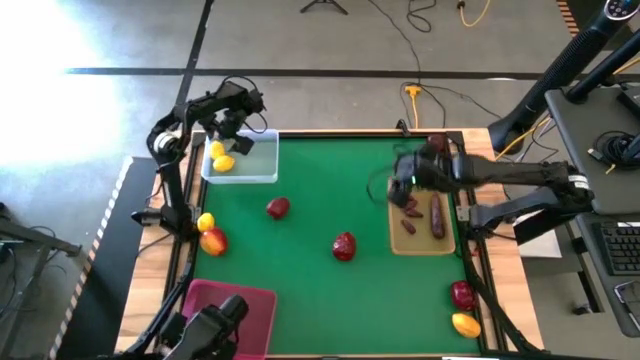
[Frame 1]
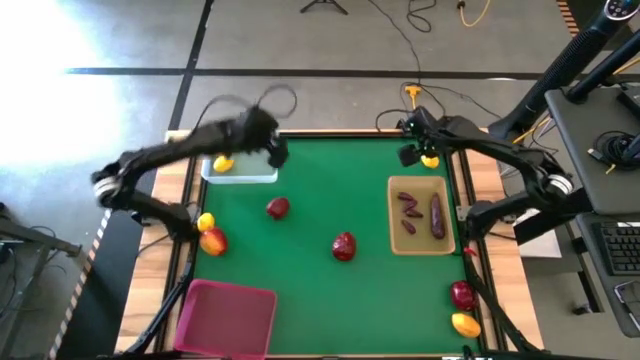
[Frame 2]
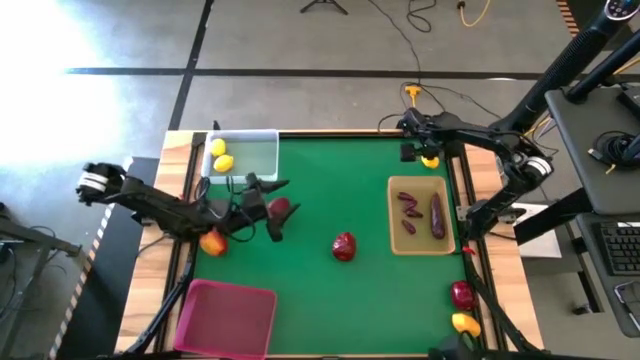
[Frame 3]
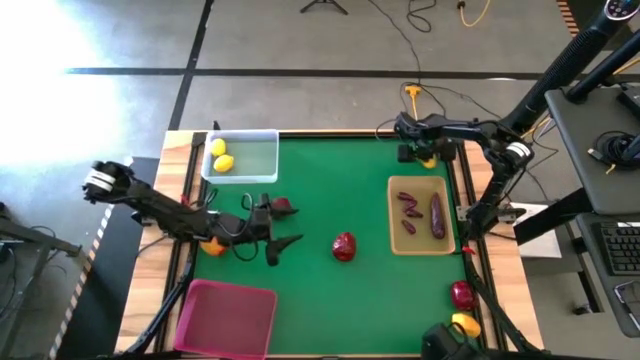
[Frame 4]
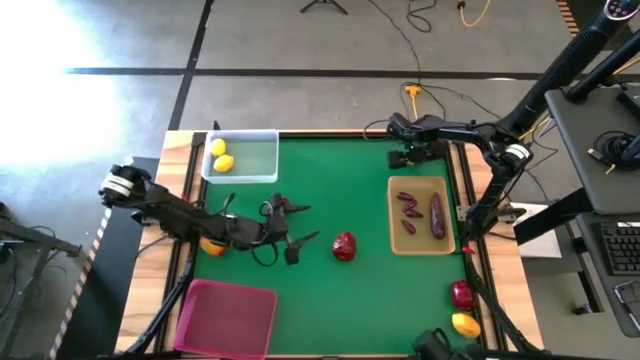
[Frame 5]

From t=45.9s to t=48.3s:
Task: Sort produce into baskets
Put the lemon into the transparent bin

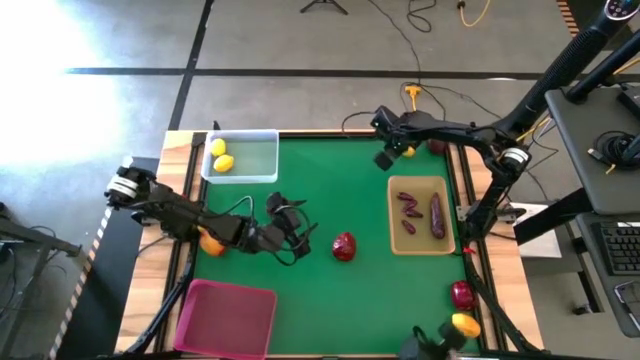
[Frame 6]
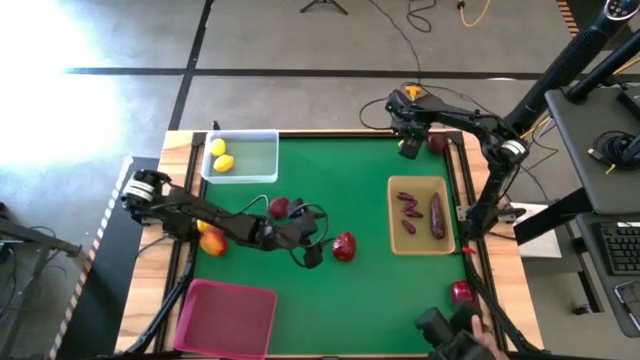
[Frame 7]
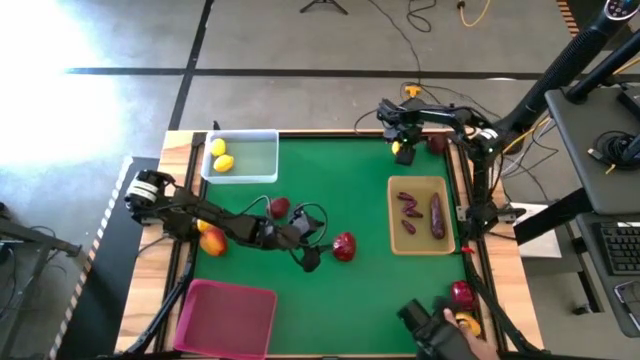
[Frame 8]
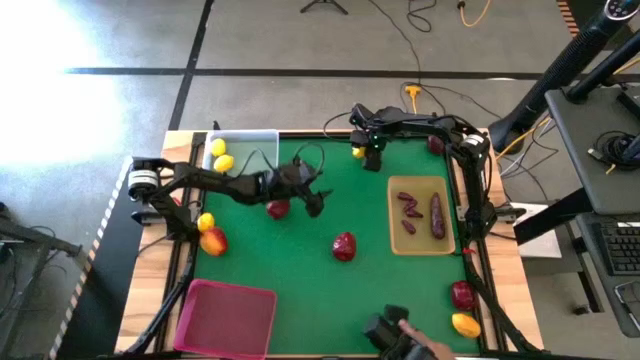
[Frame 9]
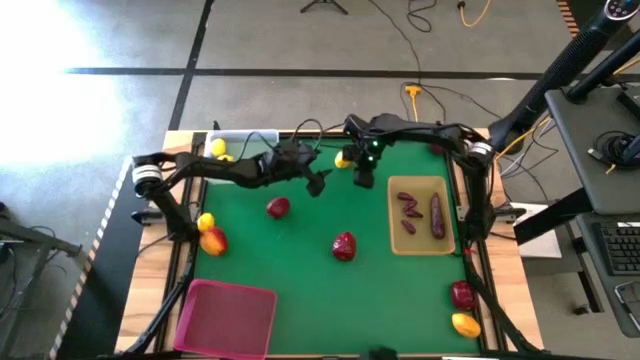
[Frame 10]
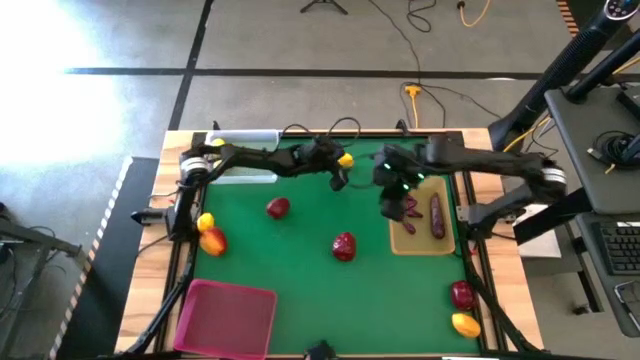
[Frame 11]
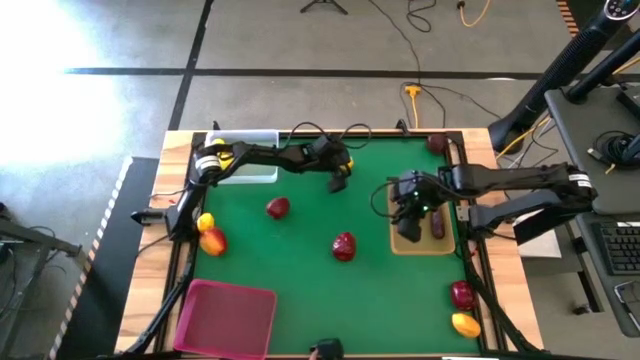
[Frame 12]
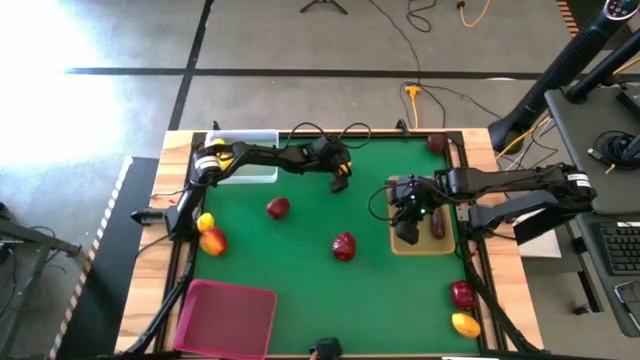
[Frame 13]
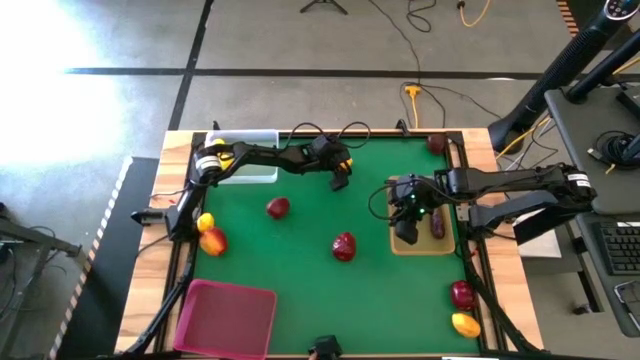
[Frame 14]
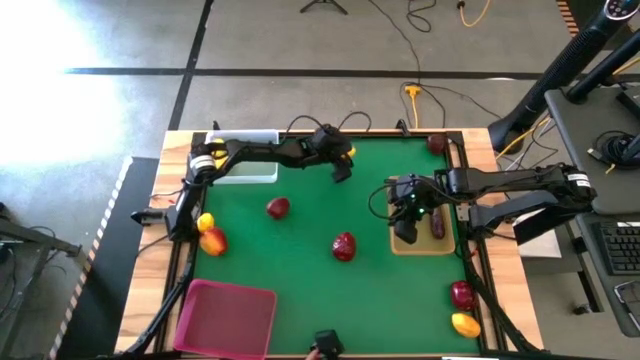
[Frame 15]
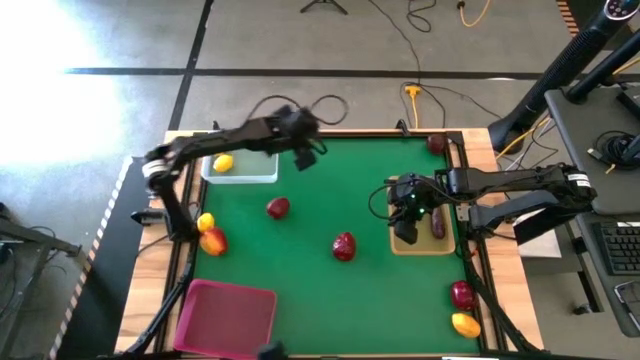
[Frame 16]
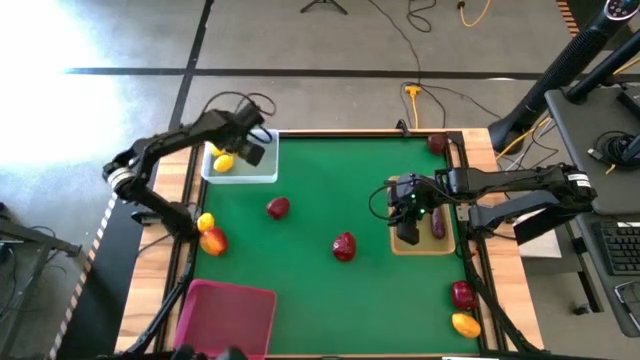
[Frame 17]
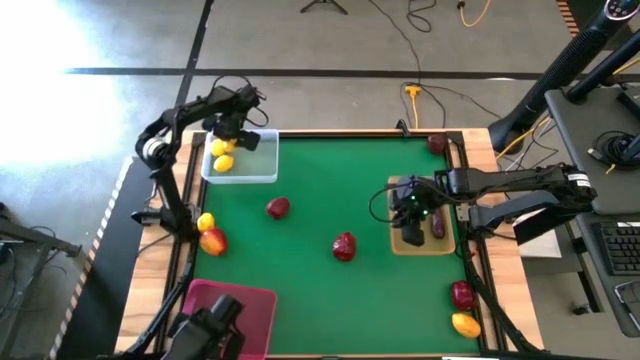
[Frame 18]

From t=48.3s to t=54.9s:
Put the lemon into the transparent bin

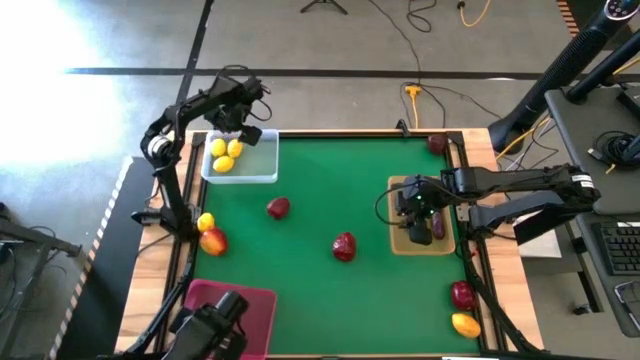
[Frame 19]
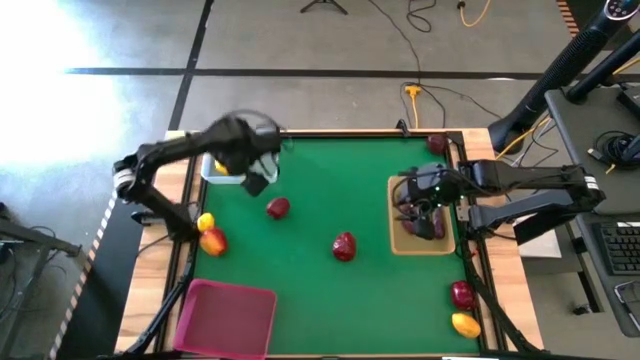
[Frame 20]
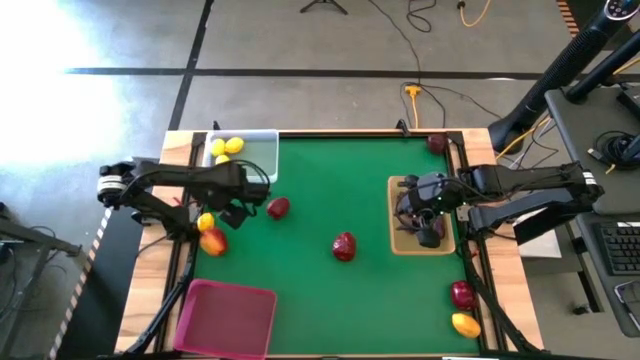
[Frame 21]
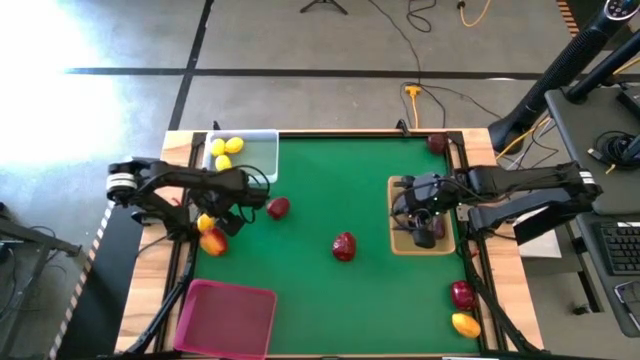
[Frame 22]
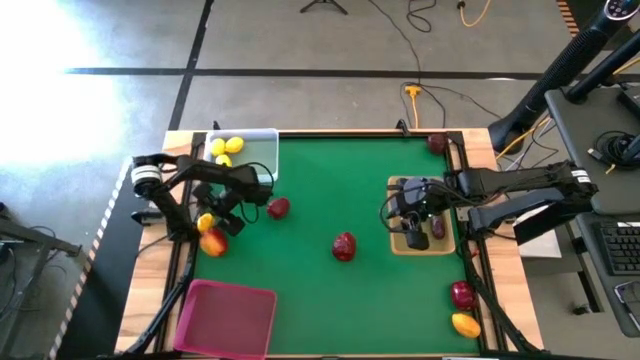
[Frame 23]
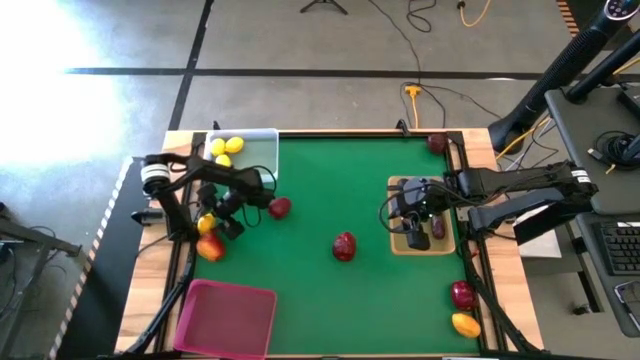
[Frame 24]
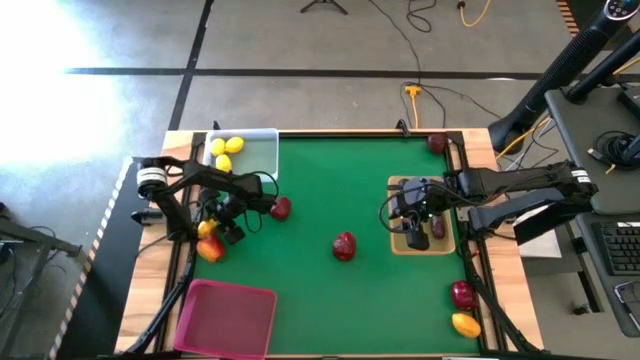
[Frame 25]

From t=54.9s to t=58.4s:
Put the lemon into the transparent bin

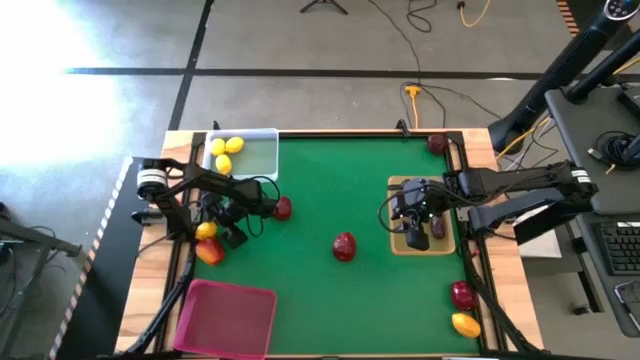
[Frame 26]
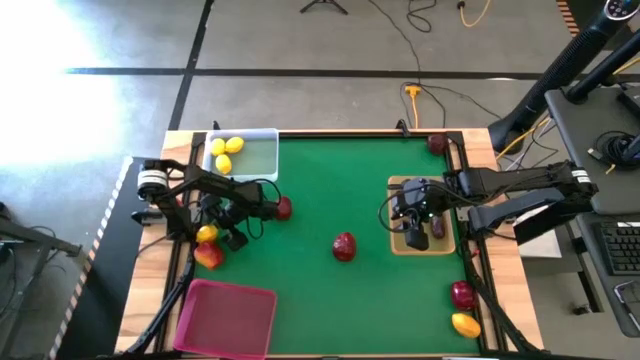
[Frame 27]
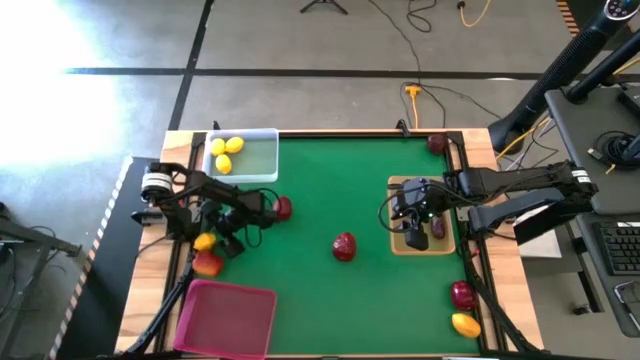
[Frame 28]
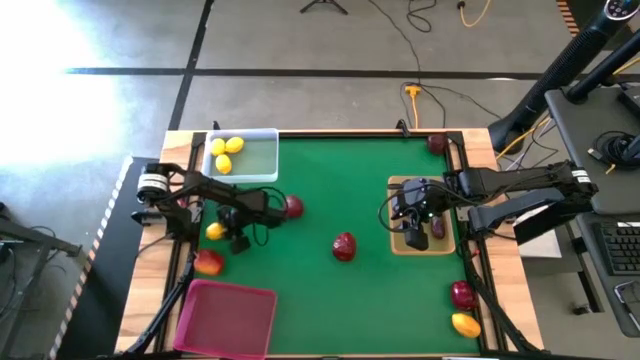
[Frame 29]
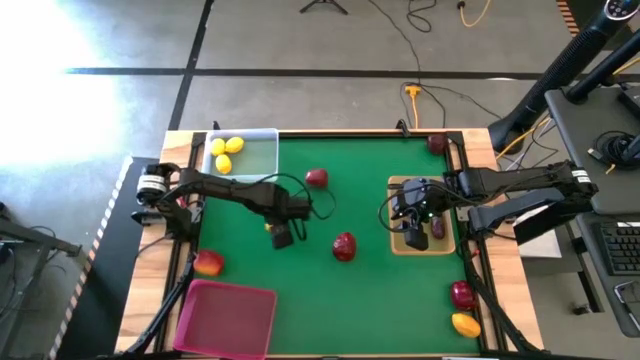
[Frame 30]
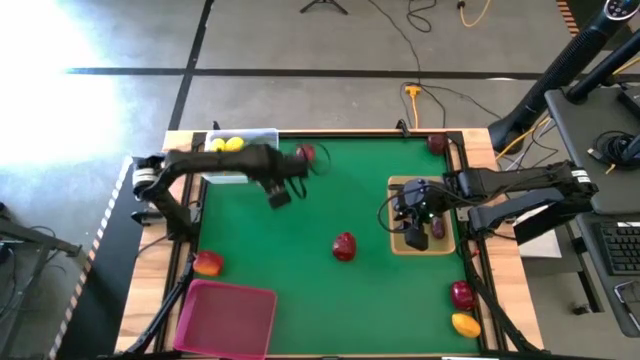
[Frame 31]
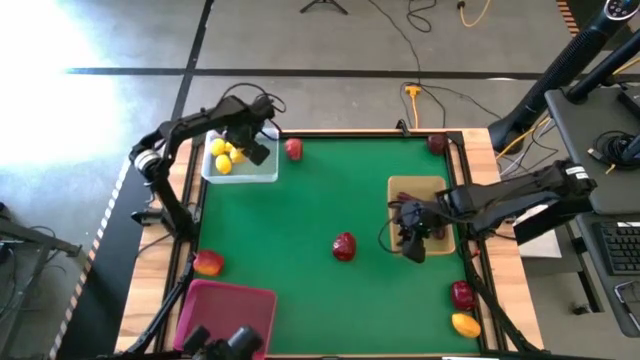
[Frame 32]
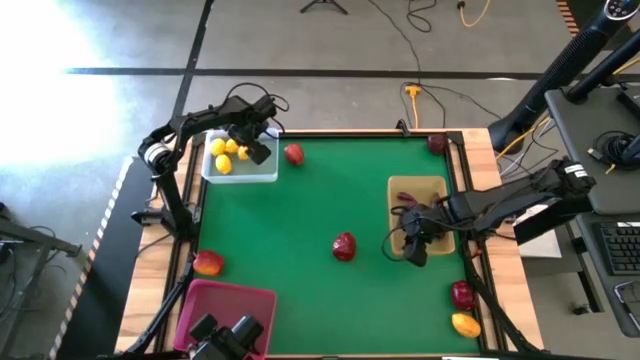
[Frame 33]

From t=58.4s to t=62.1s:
Put the lemon into the transparent bin

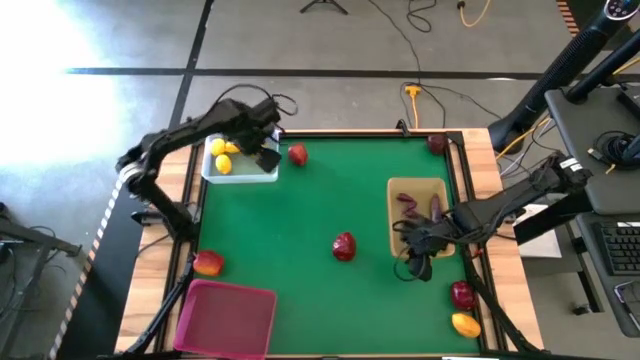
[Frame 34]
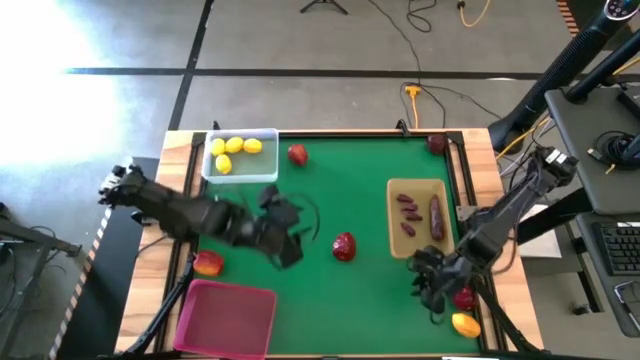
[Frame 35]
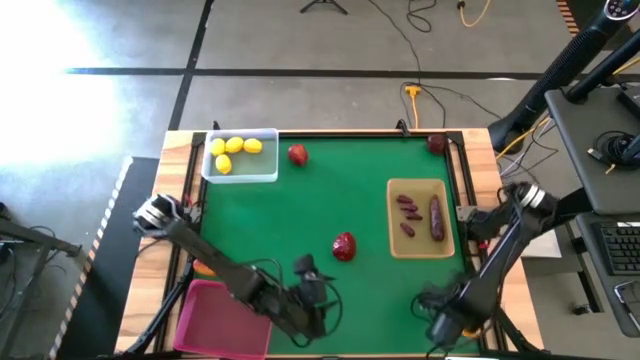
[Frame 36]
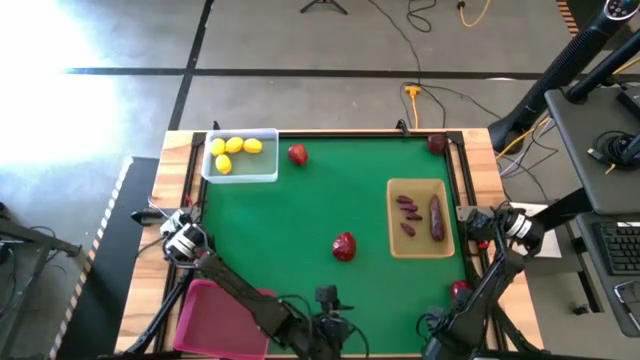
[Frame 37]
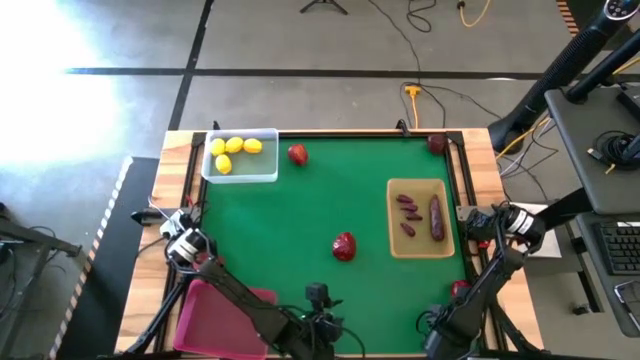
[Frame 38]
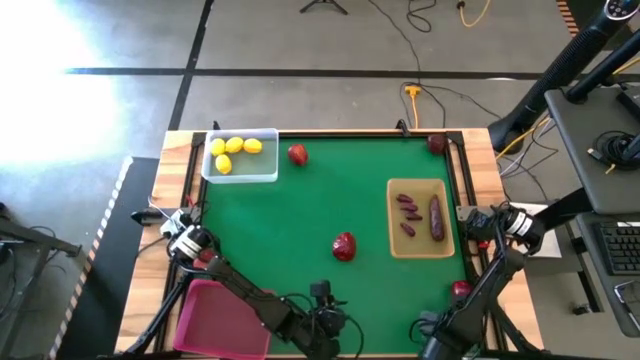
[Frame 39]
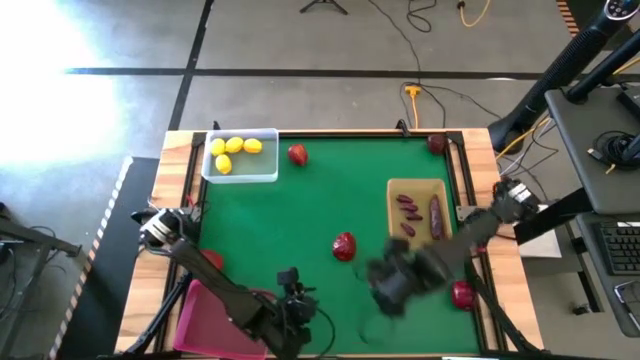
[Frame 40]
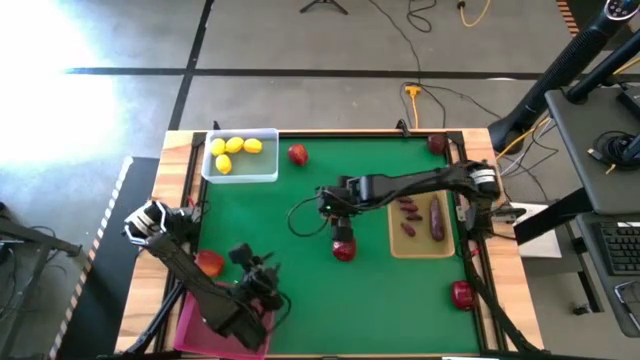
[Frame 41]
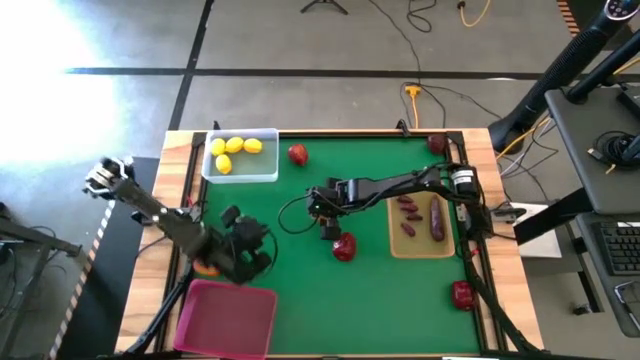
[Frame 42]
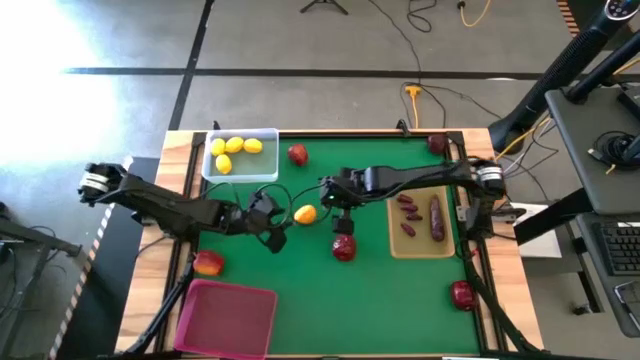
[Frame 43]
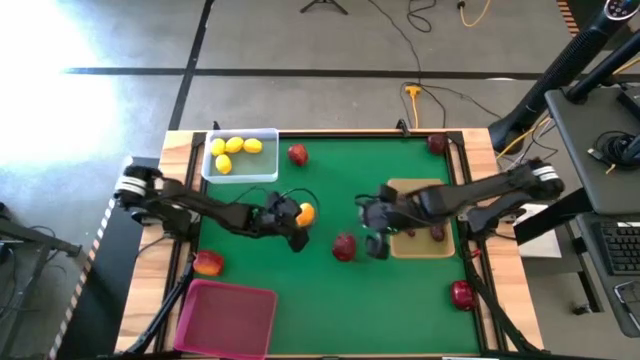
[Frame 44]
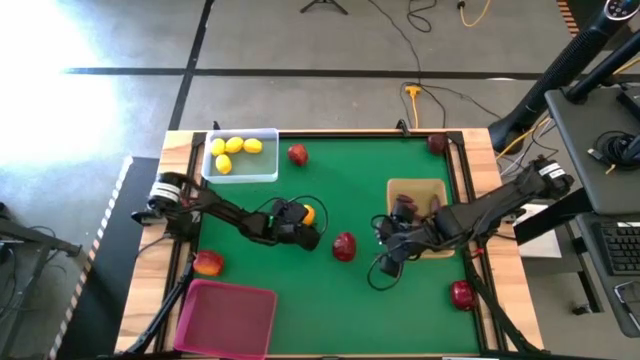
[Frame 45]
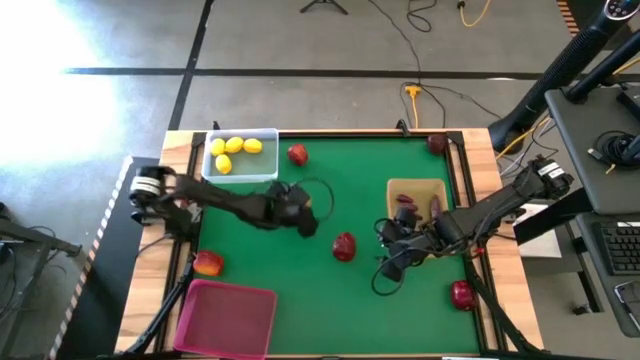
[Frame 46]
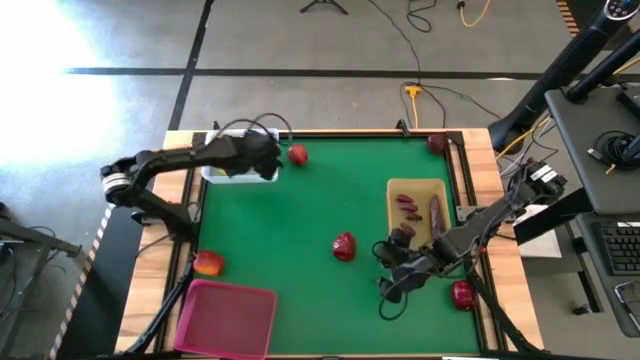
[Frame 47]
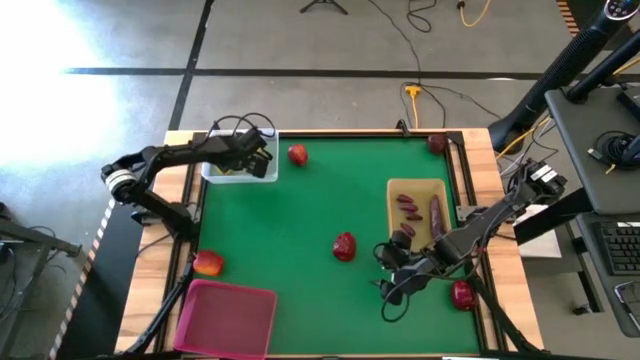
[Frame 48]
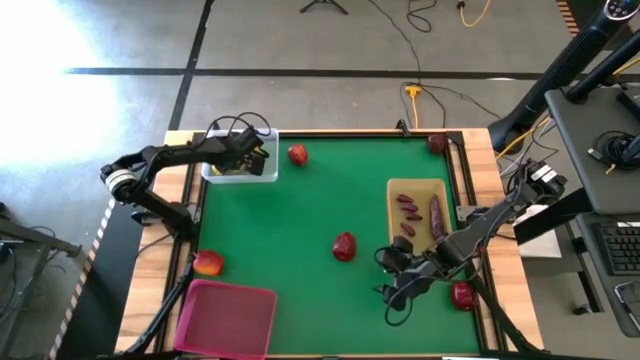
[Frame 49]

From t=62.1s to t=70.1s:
Put the lemon into the transparent bin
